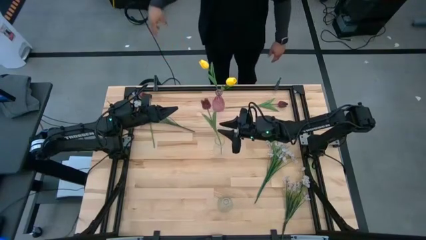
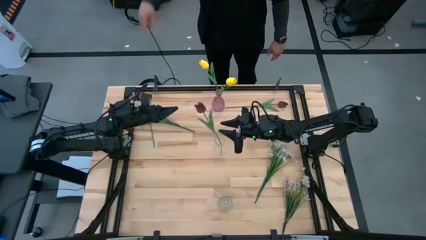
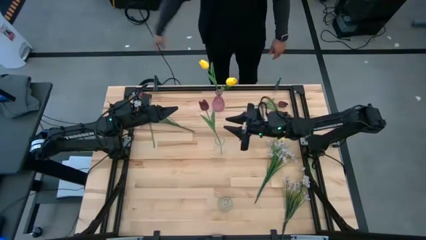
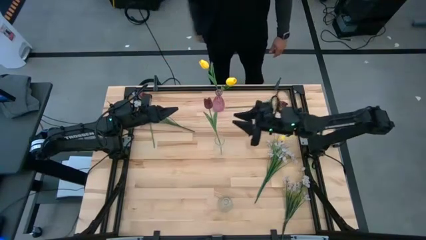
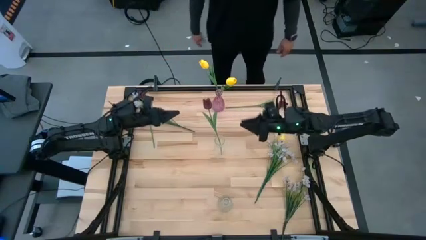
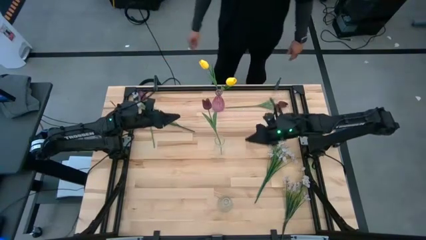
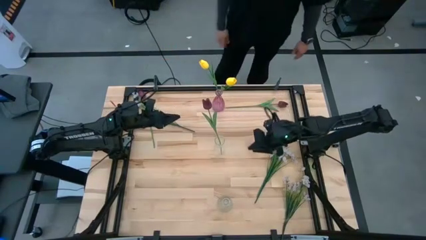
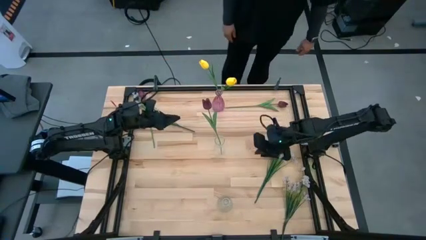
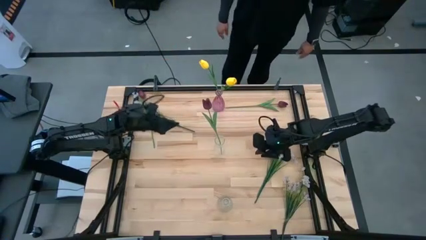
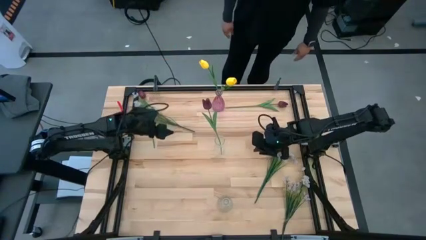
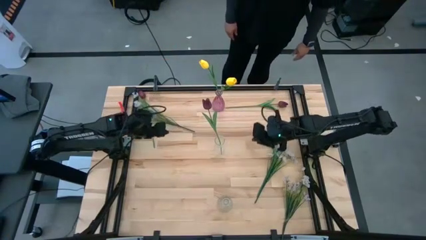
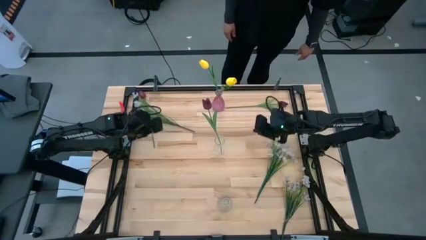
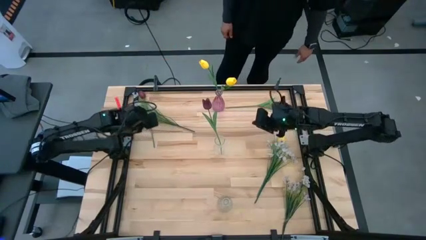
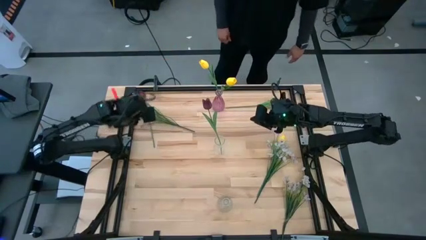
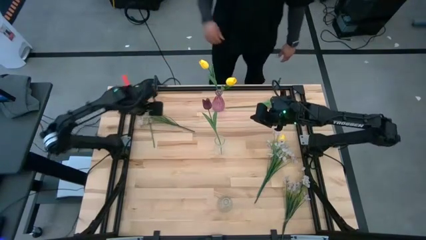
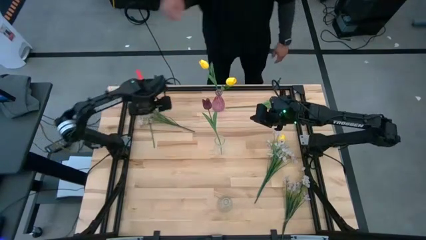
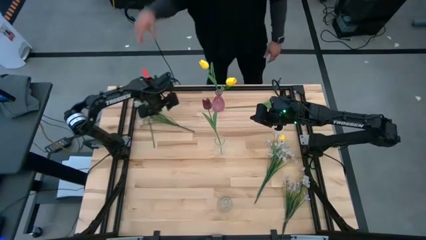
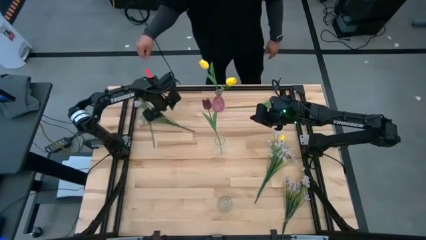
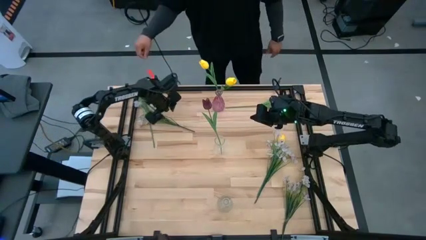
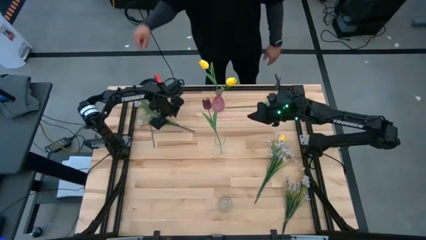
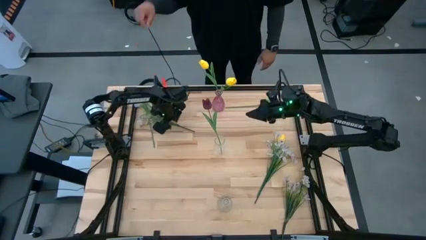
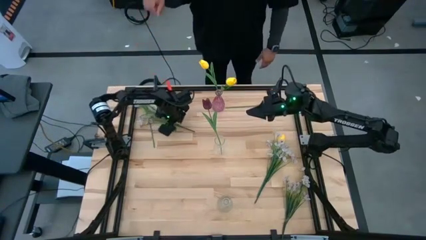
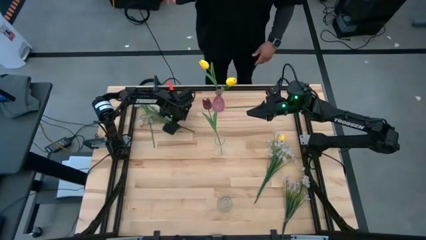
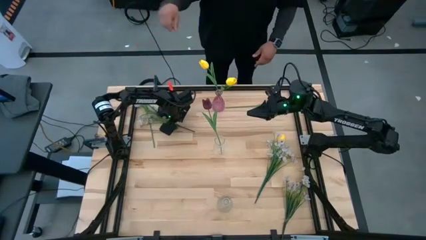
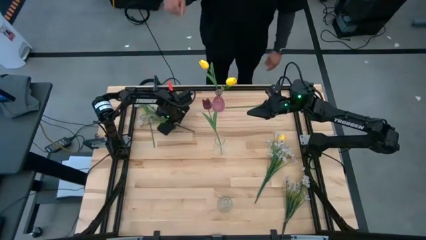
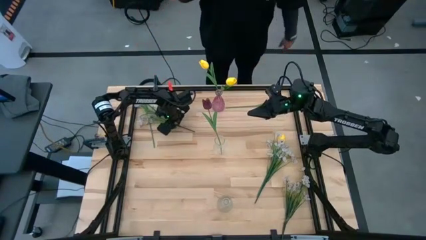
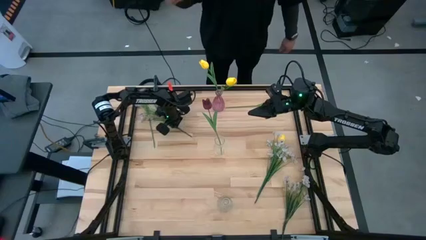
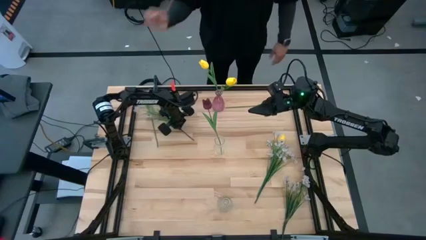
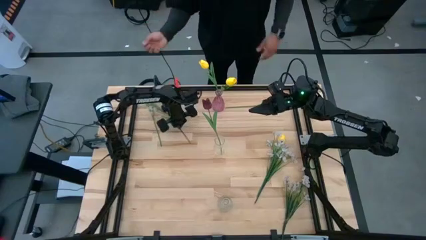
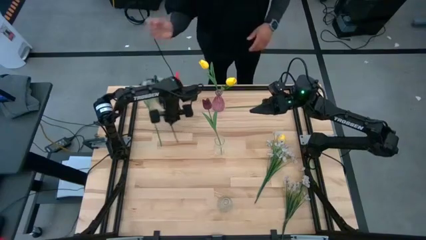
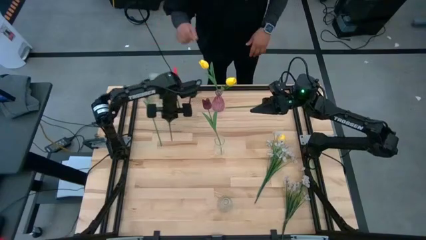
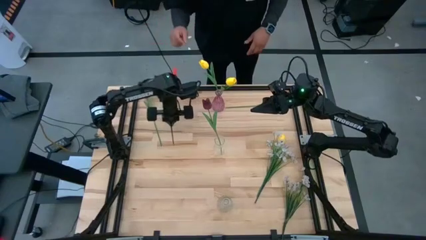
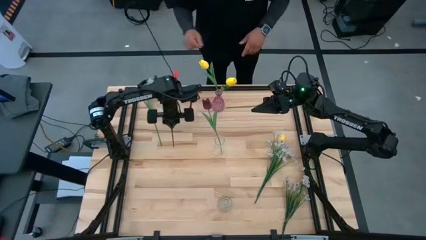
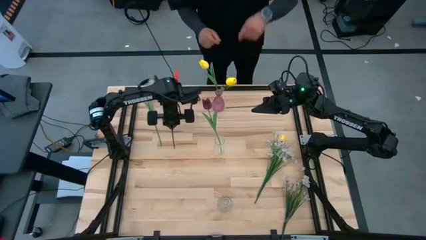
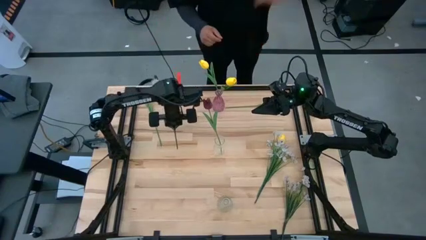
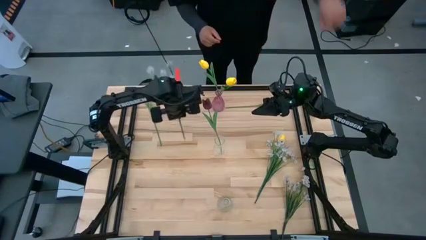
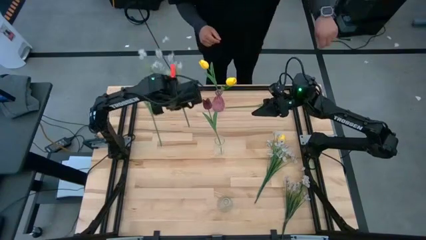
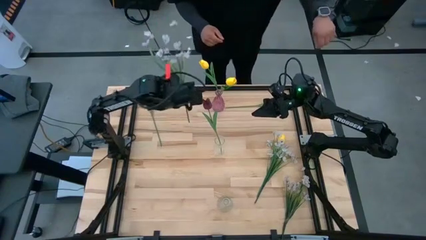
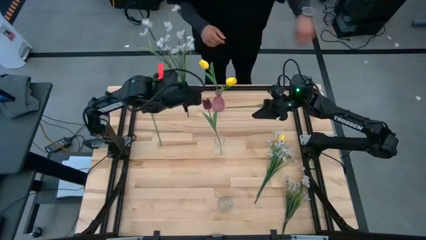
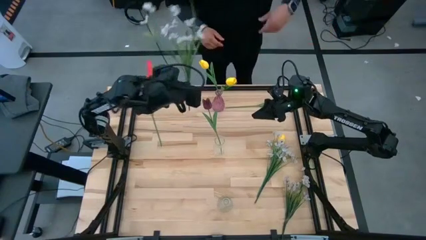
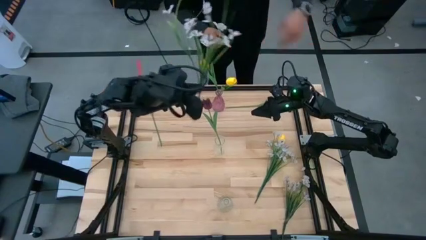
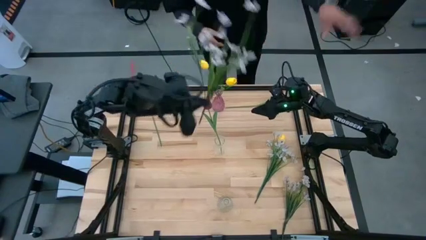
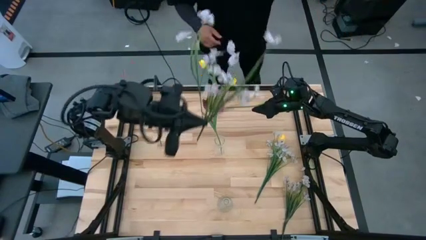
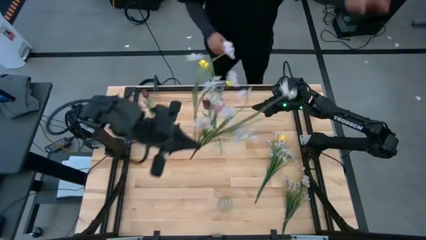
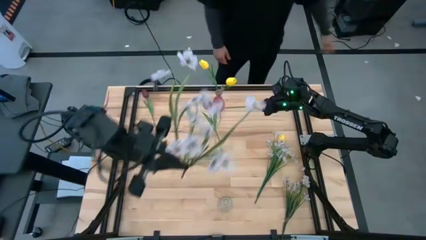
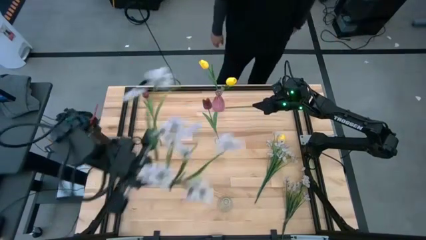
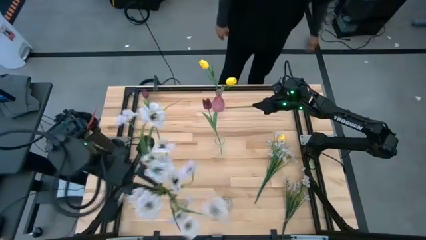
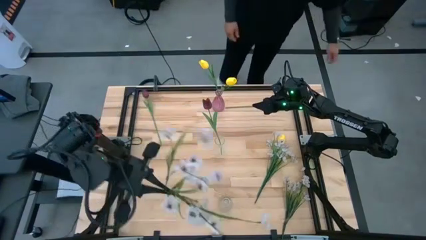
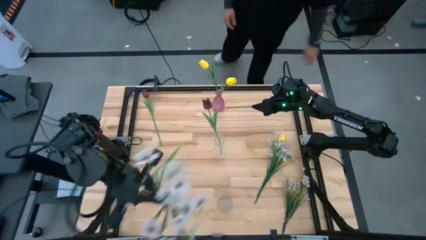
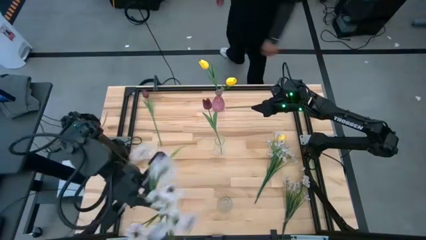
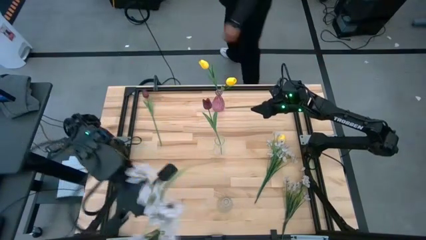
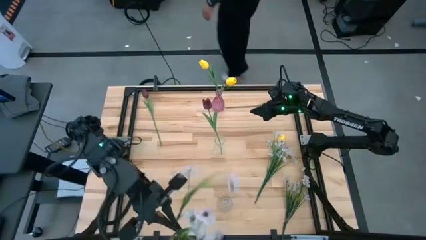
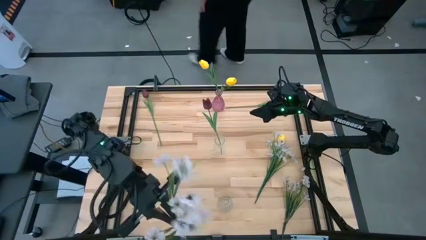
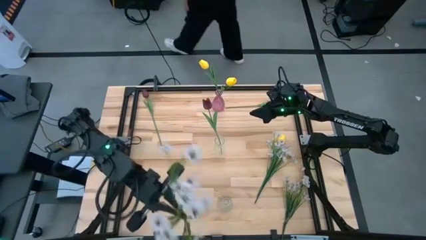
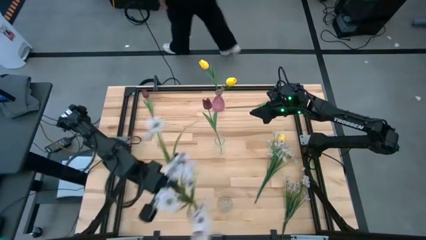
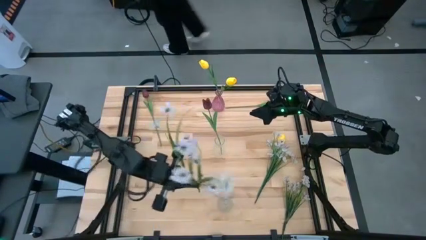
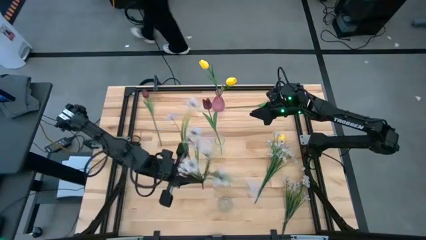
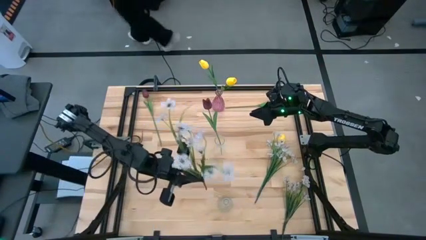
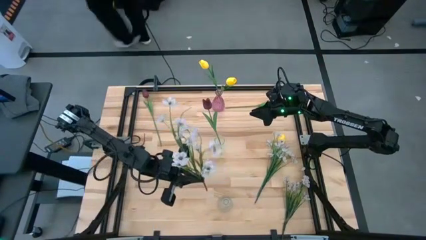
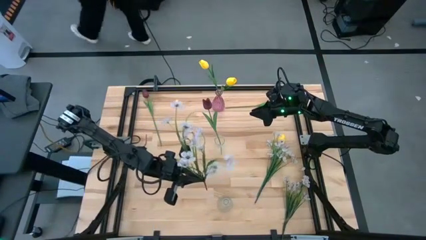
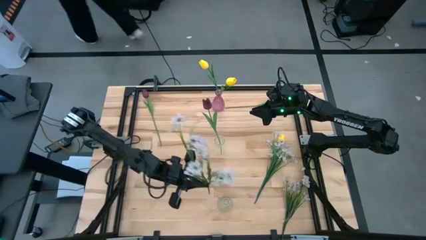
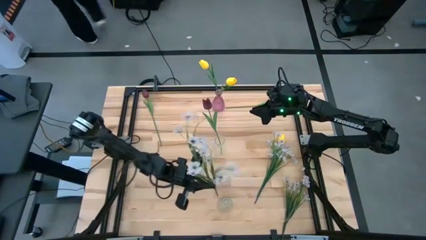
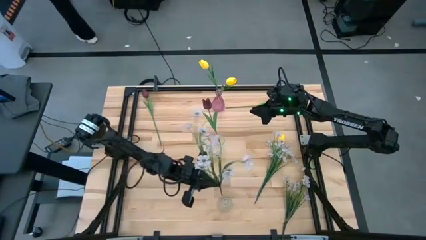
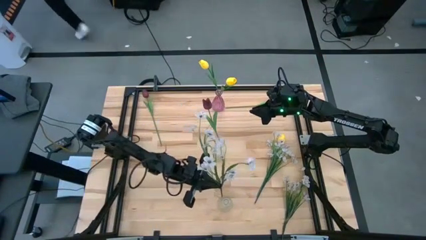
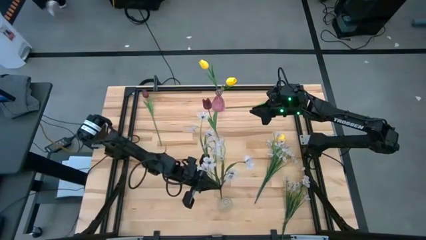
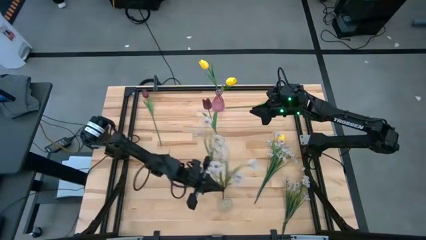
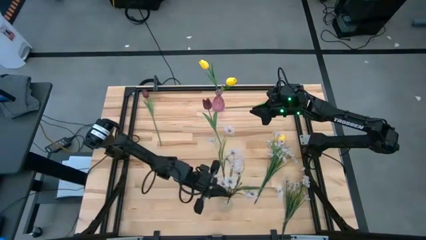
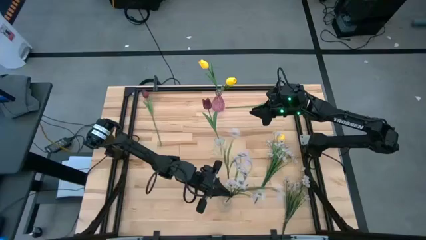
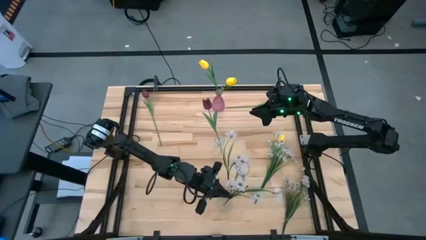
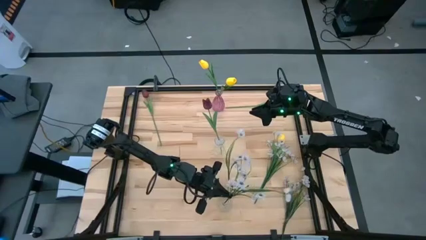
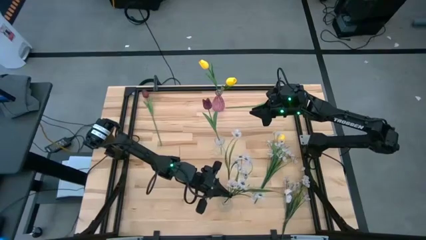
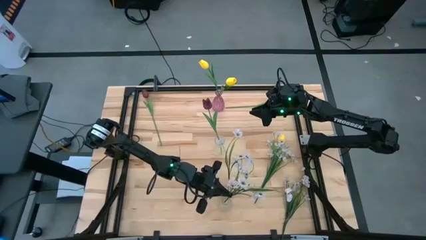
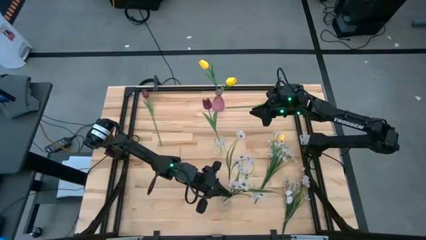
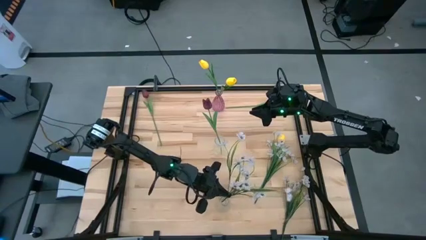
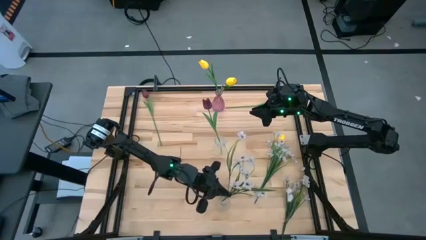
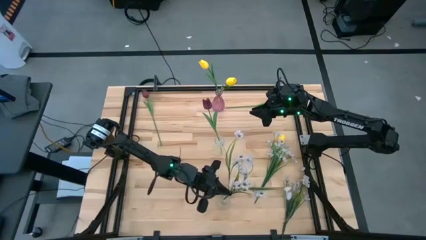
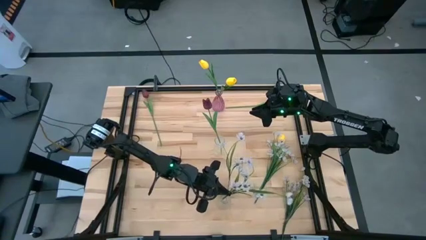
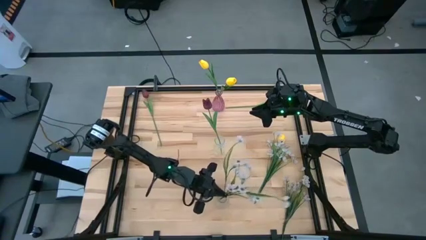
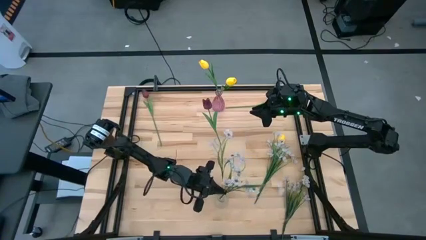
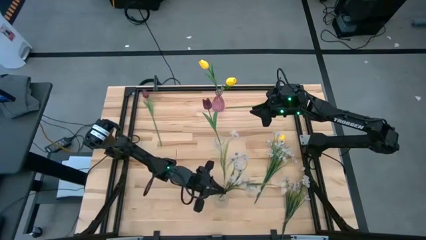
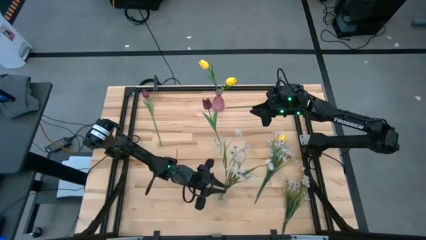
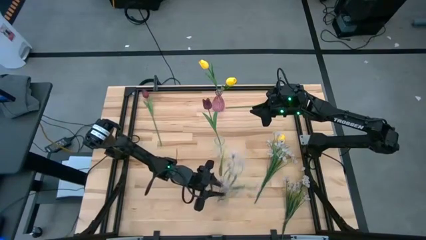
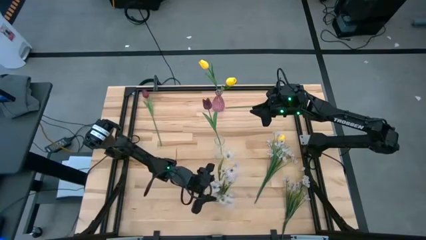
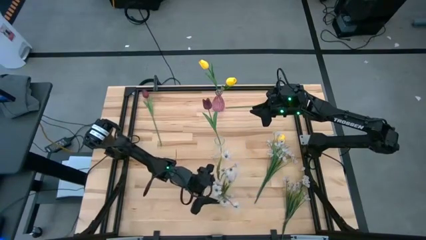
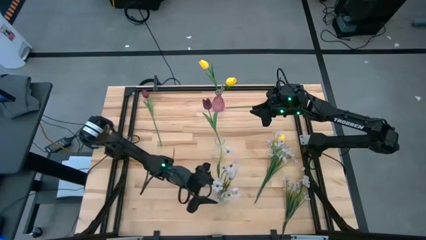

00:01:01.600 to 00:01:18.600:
Task: Sort flowers into vase by color
Put the top white flowers into the bottom transparent vase
